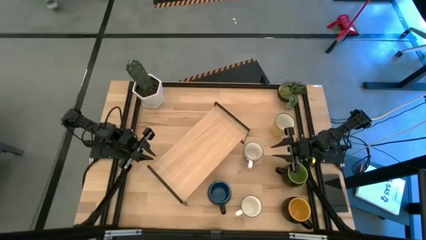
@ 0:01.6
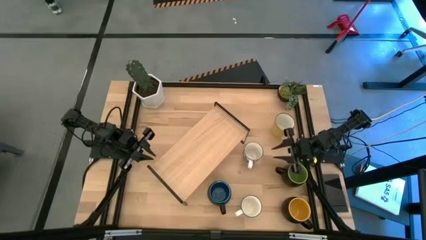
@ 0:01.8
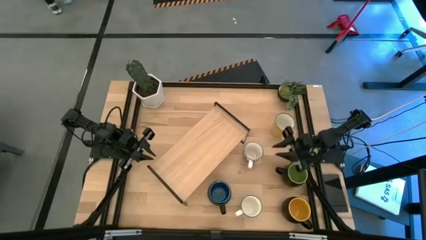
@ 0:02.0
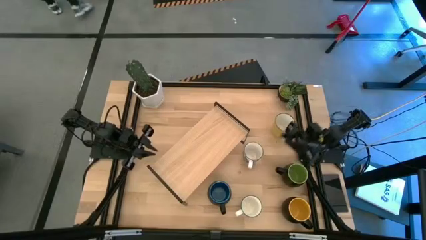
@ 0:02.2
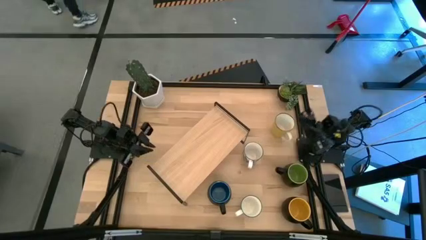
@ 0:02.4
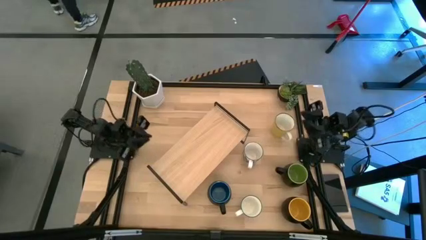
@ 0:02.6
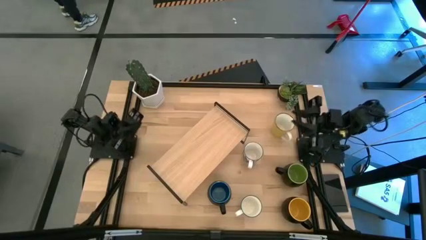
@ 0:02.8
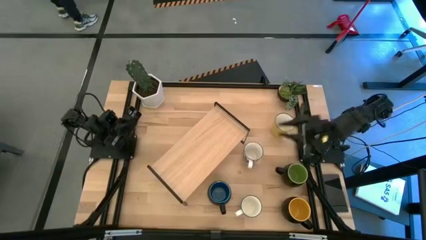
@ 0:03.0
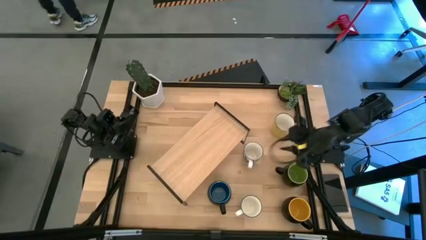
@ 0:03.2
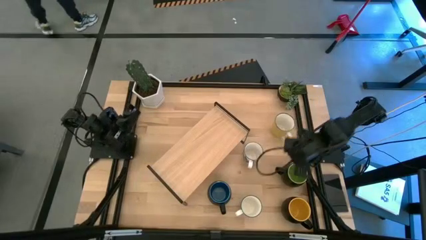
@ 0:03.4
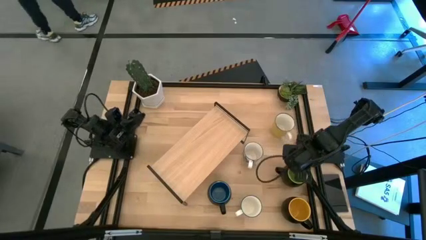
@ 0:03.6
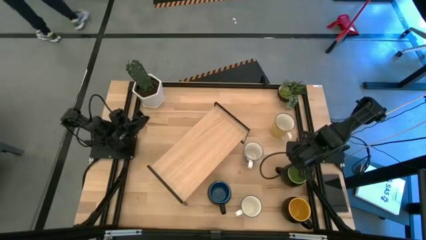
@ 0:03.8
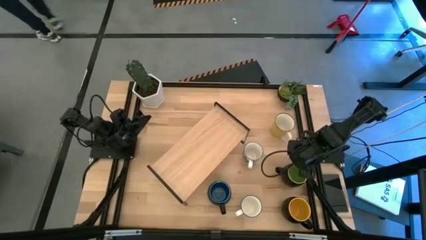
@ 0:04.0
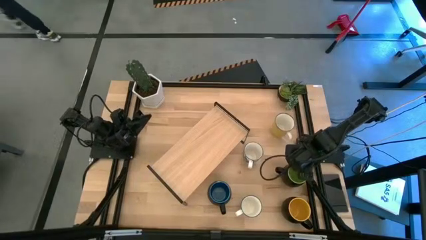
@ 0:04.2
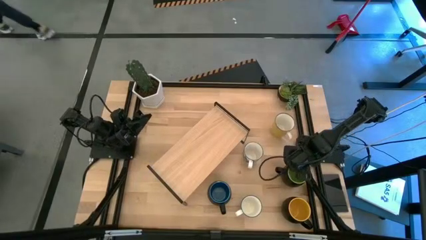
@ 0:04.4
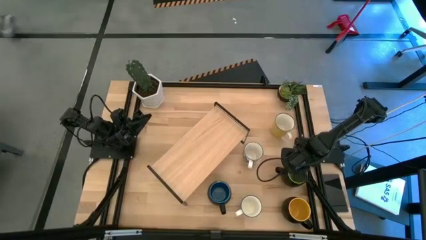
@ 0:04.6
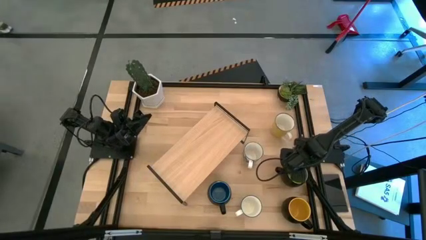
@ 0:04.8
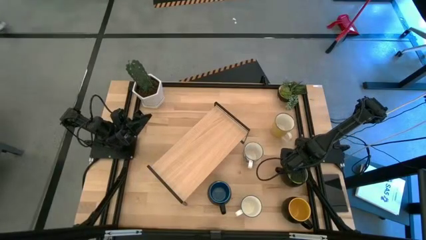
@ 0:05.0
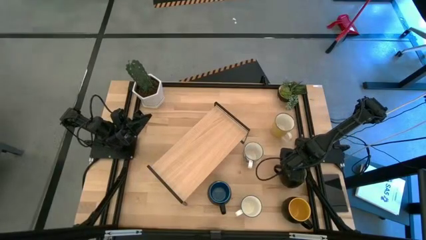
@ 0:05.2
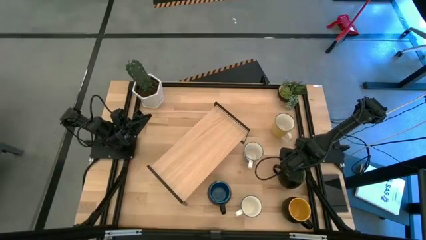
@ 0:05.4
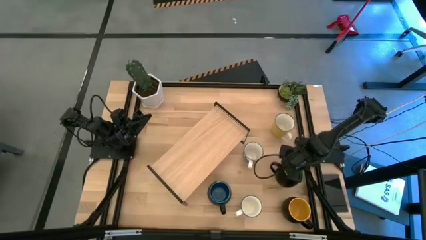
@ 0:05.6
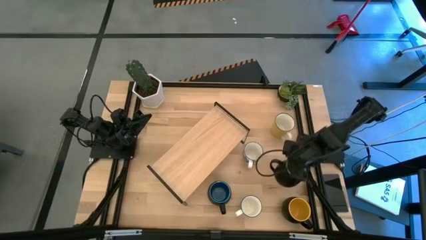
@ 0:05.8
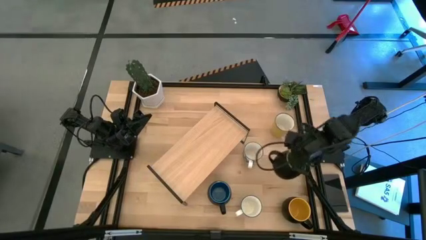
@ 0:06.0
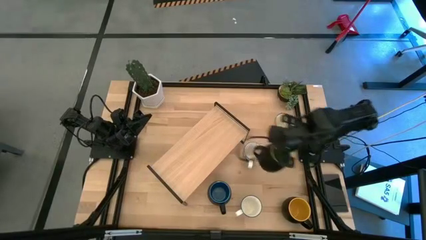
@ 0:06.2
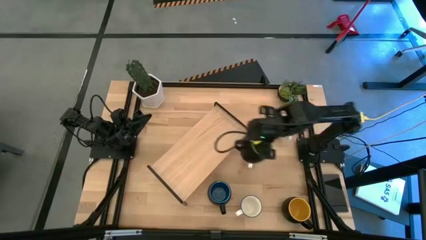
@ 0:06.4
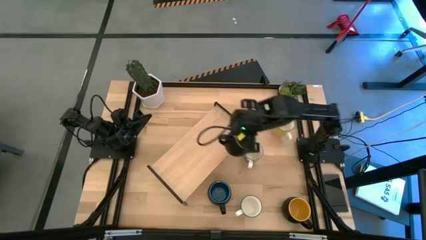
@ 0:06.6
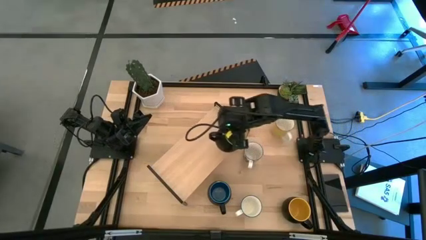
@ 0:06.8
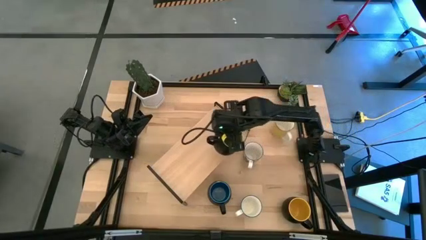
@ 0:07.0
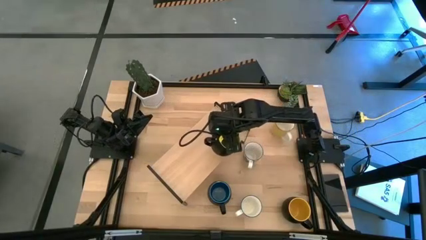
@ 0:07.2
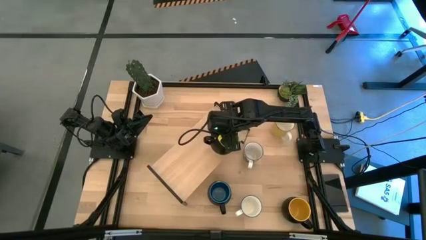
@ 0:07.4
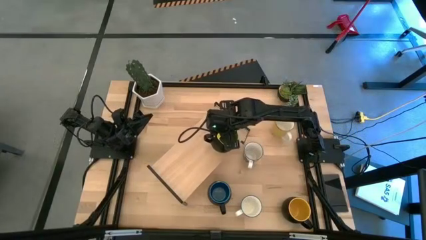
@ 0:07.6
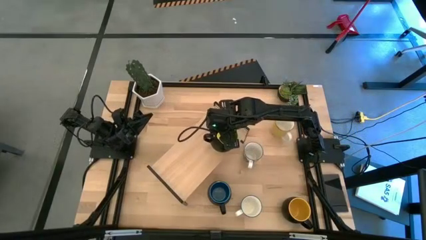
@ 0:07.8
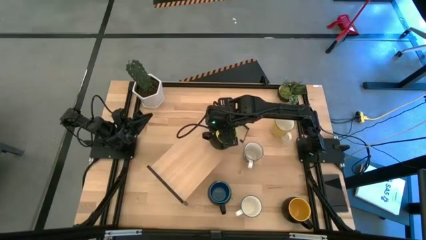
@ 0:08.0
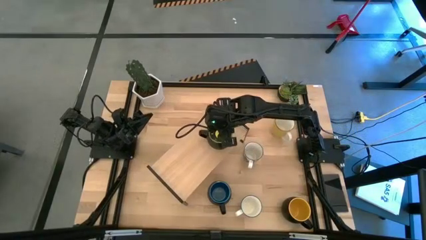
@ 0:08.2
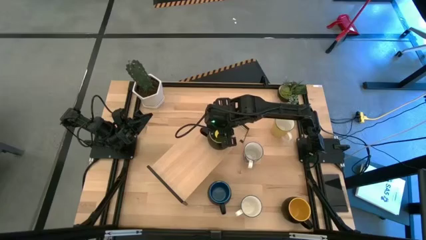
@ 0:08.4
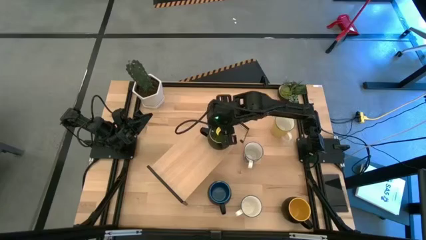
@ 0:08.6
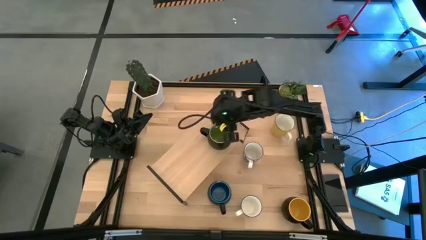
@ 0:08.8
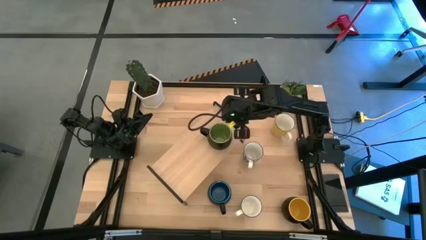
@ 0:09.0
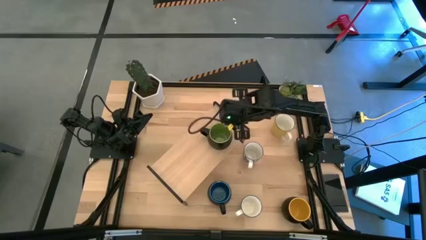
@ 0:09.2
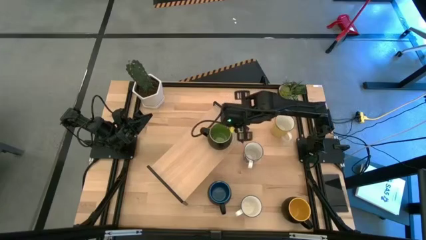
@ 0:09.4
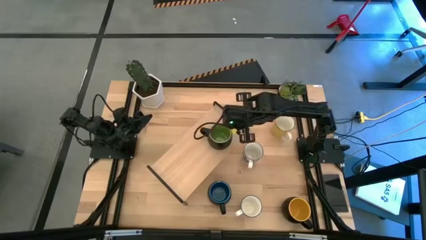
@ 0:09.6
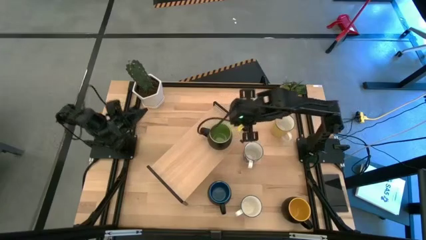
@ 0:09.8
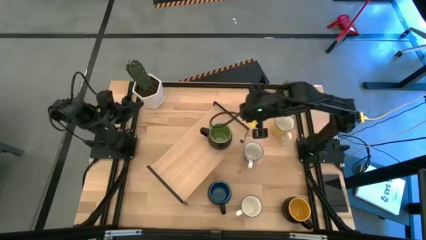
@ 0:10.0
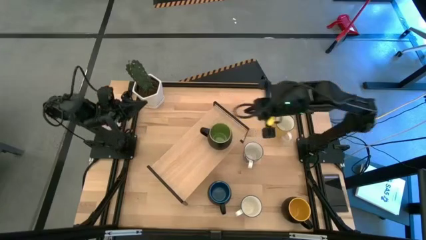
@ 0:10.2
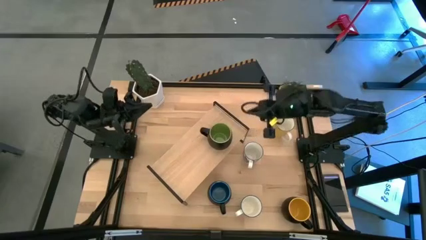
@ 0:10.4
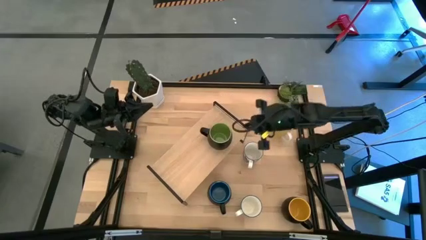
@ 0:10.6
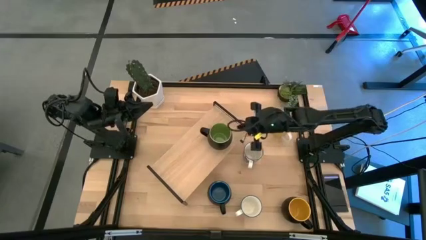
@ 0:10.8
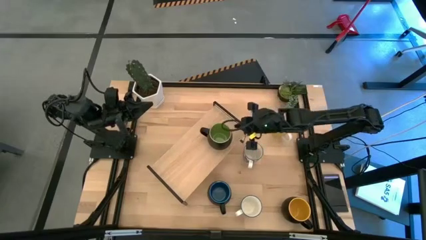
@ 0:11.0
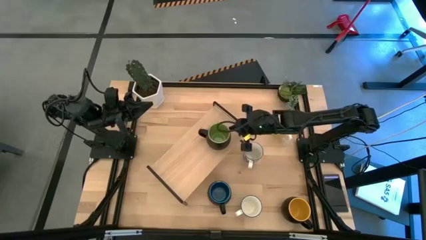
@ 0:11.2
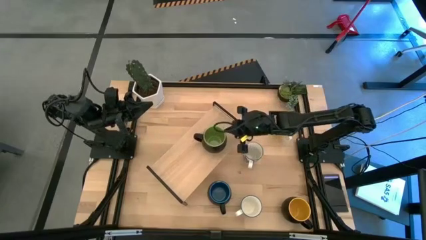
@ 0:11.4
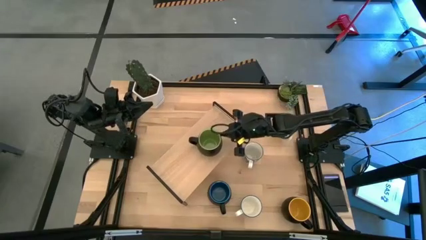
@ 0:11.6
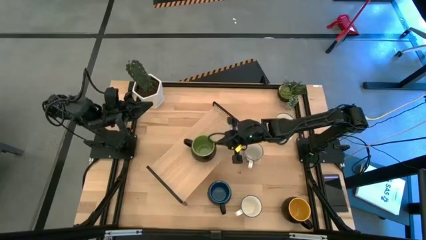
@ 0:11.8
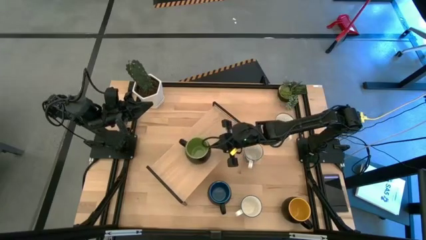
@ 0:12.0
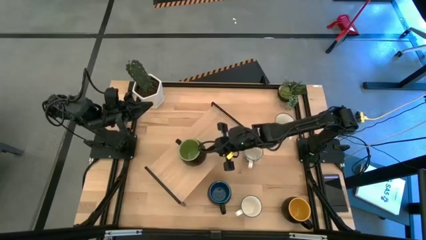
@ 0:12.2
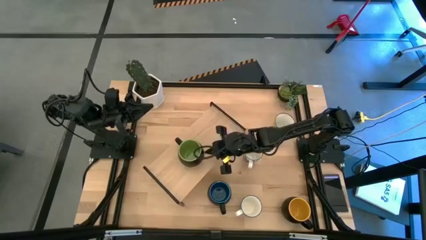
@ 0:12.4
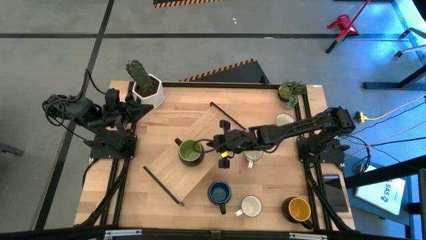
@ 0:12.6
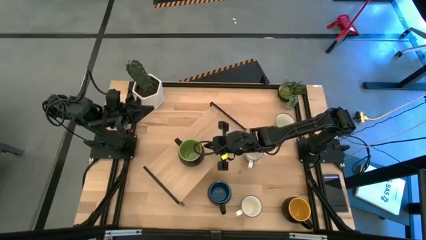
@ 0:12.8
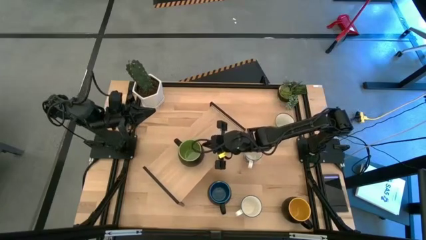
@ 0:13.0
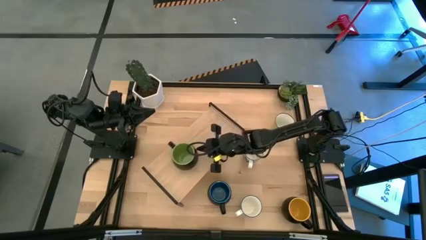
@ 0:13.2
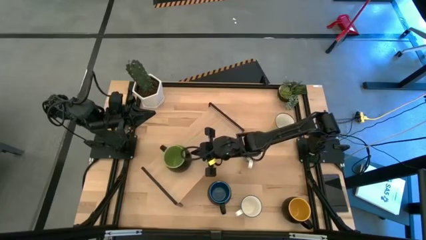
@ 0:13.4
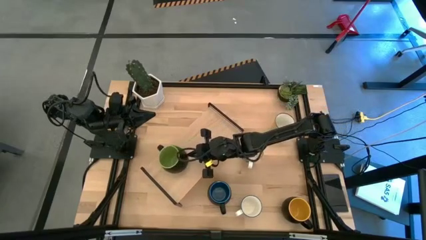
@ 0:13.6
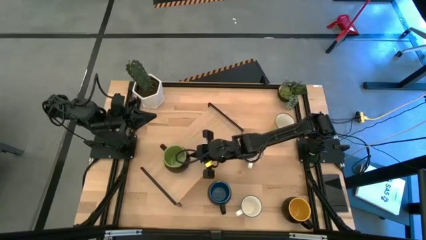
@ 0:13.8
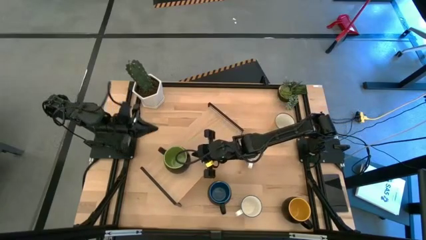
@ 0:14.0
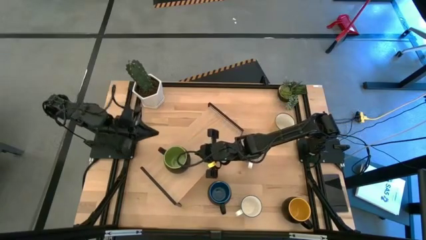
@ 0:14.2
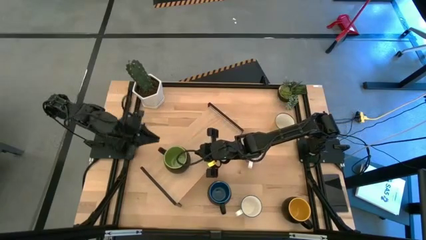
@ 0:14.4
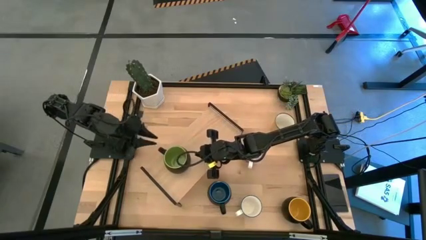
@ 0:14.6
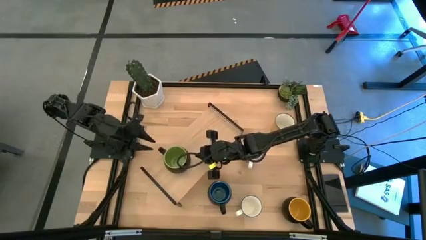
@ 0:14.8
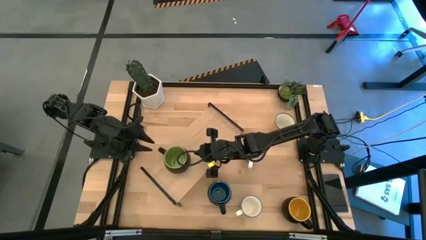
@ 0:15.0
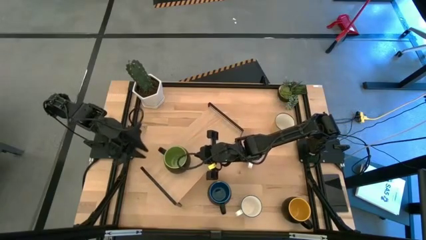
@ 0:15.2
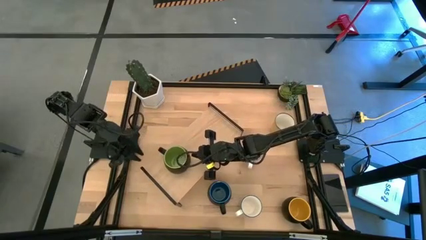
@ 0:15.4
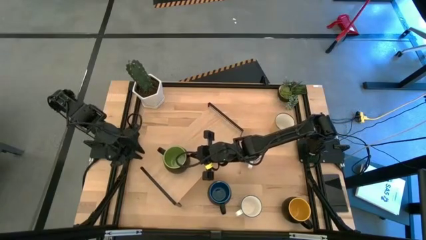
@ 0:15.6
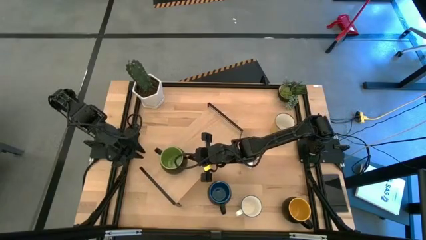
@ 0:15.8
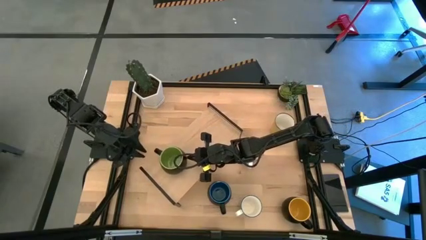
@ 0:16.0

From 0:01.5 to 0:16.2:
Task: Place coffee mugs
Put the green black mug on the shelf
